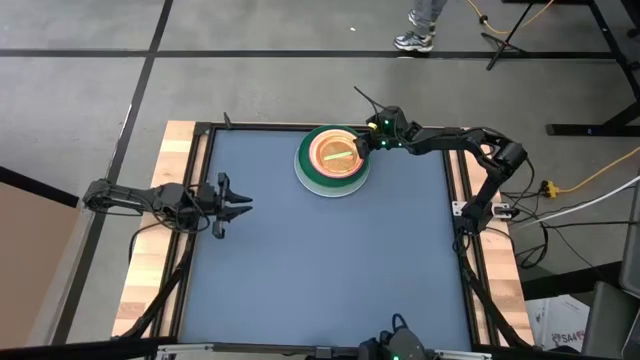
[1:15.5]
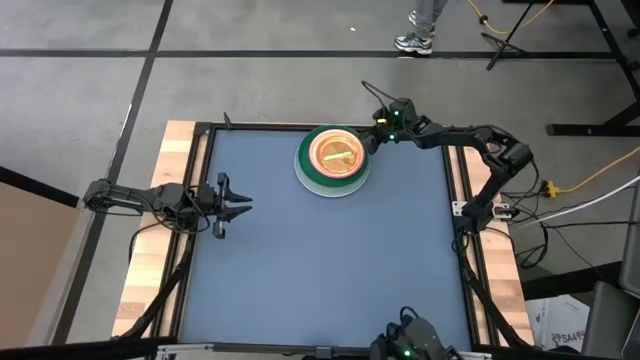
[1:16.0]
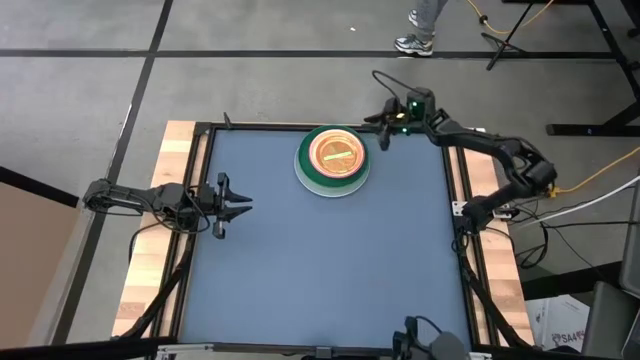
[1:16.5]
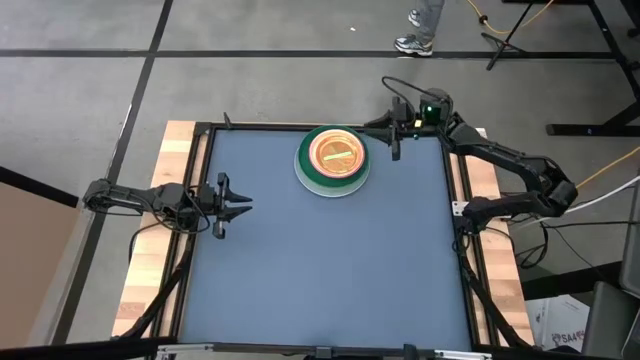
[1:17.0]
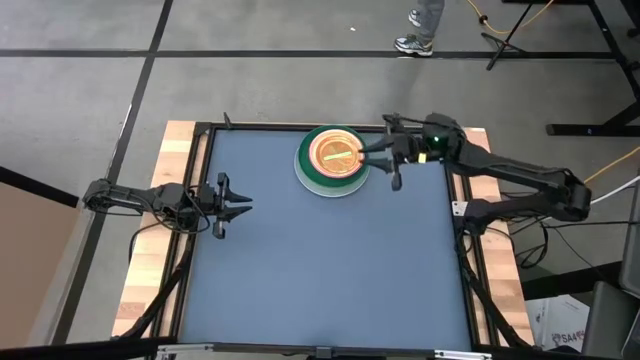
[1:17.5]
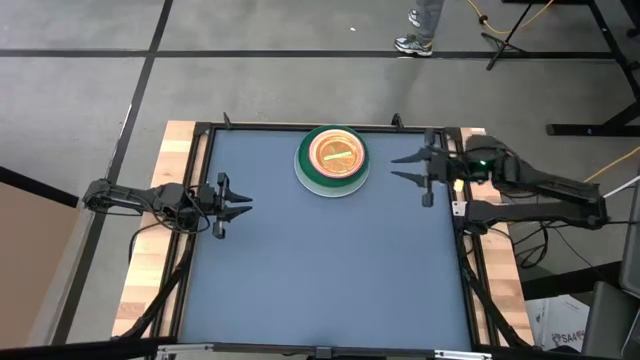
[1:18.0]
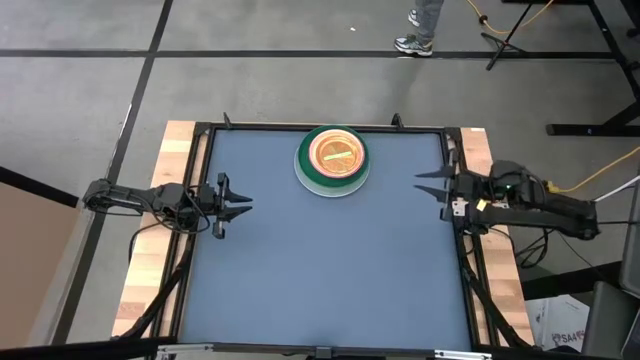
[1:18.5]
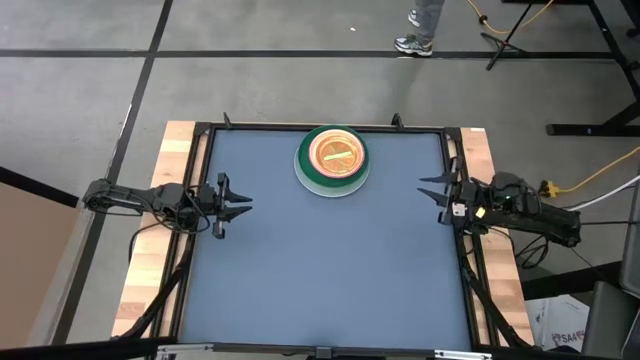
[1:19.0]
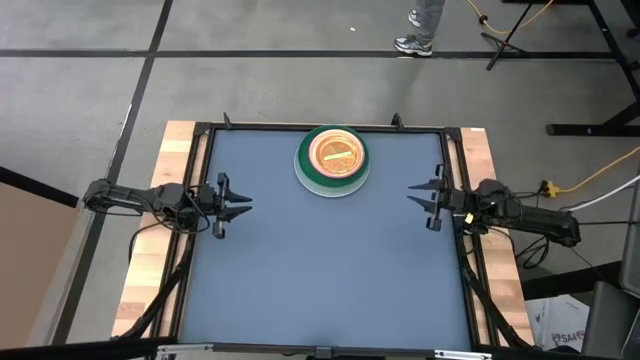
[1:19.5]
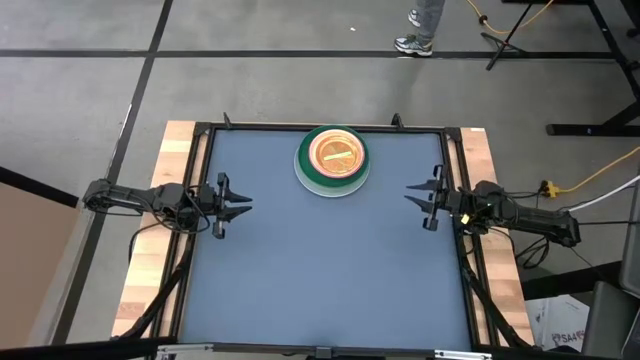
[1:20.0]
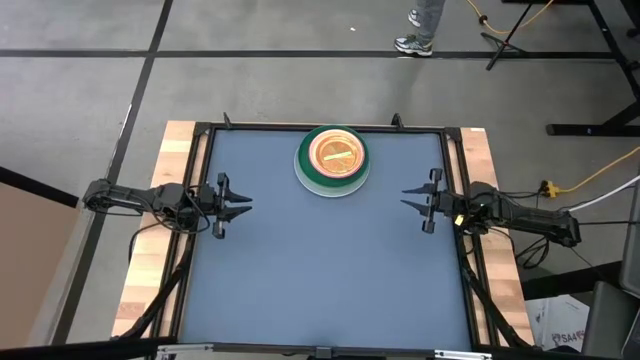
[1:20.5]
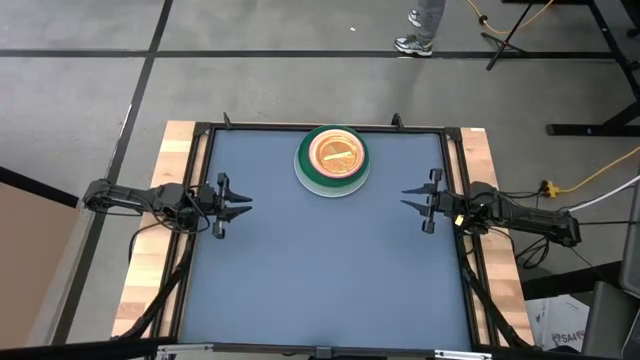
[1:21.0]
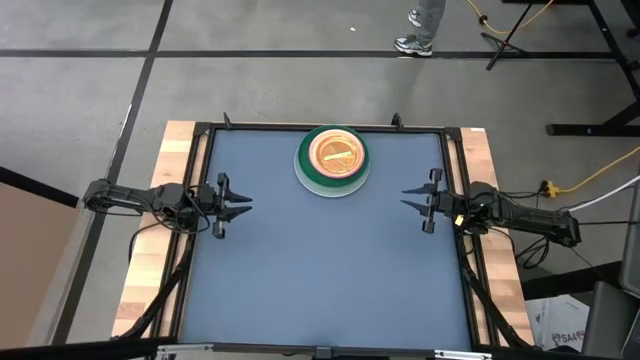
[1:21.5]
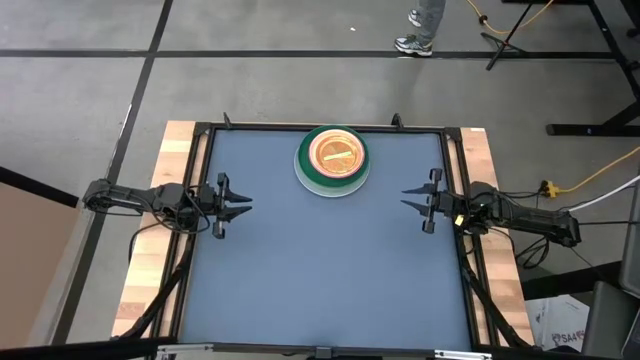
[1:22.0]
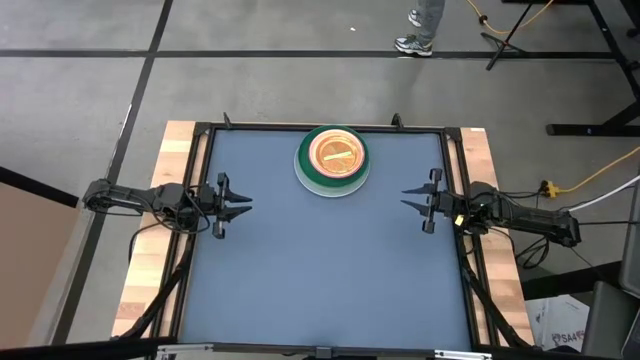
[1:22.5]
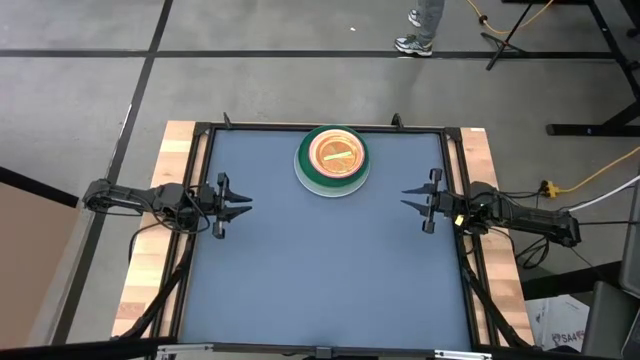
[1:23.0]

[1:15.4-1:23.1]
Task: Stack plastic plates
Return to Home Position

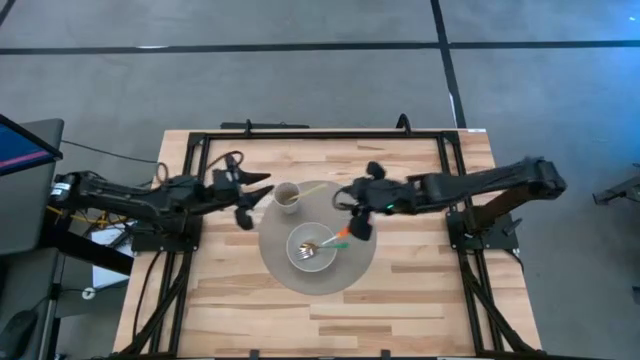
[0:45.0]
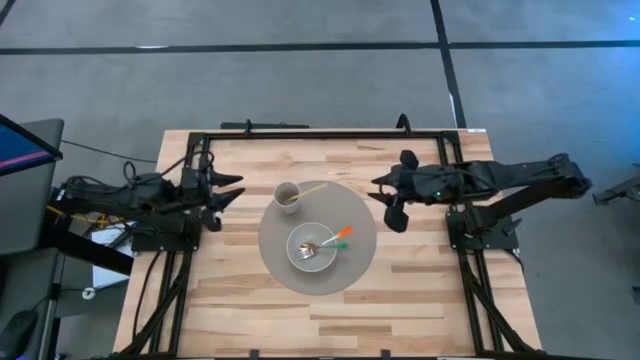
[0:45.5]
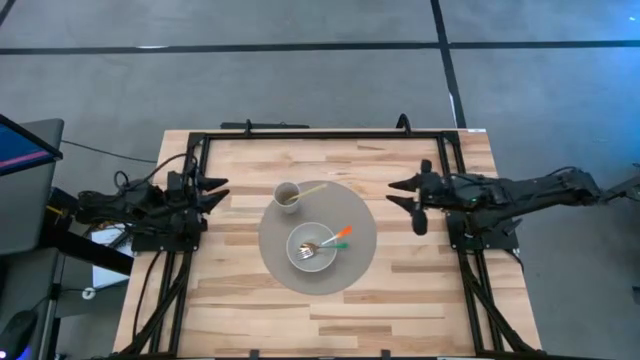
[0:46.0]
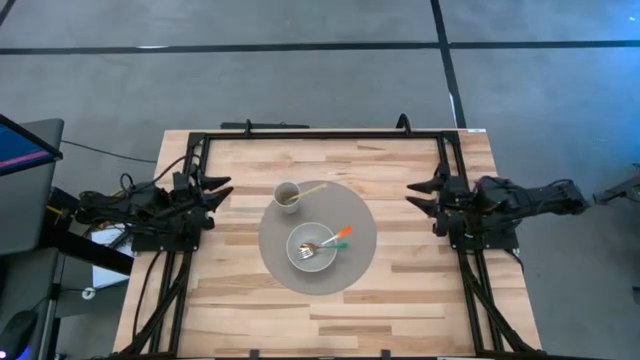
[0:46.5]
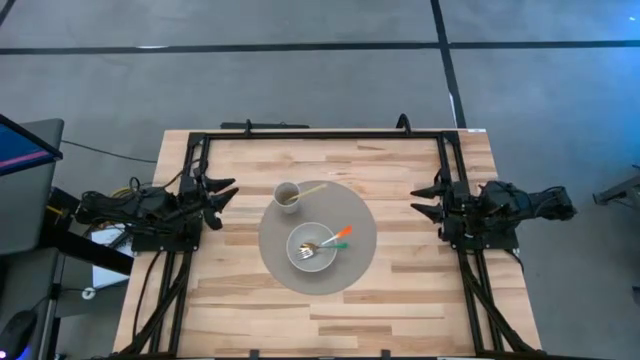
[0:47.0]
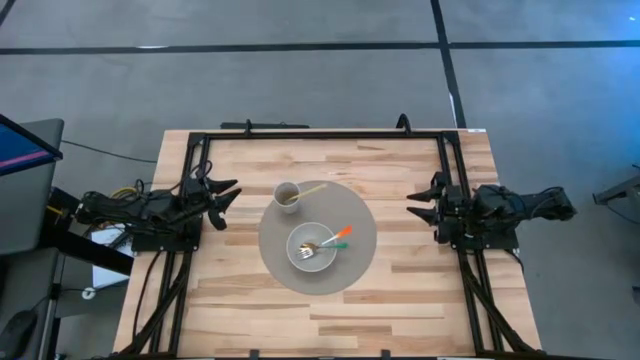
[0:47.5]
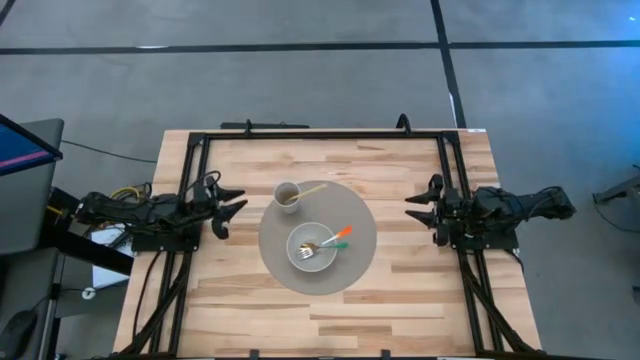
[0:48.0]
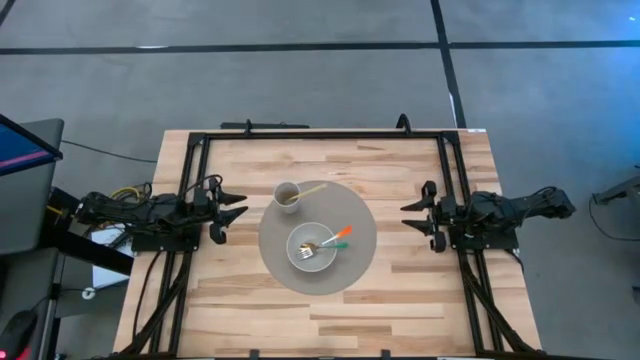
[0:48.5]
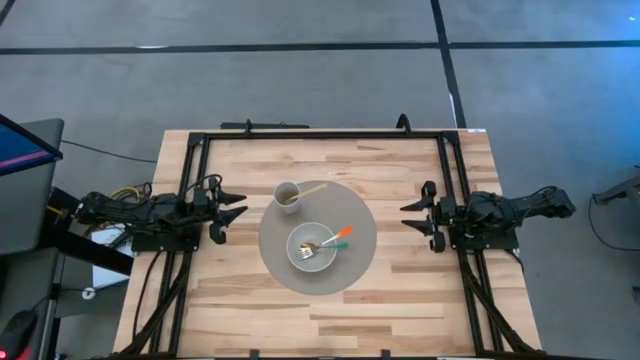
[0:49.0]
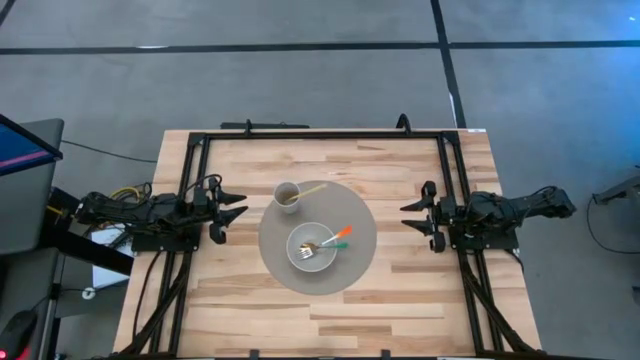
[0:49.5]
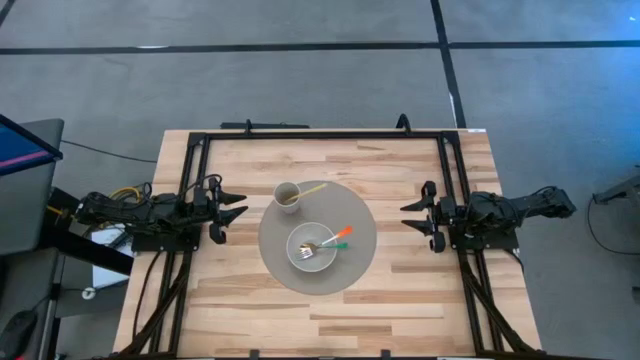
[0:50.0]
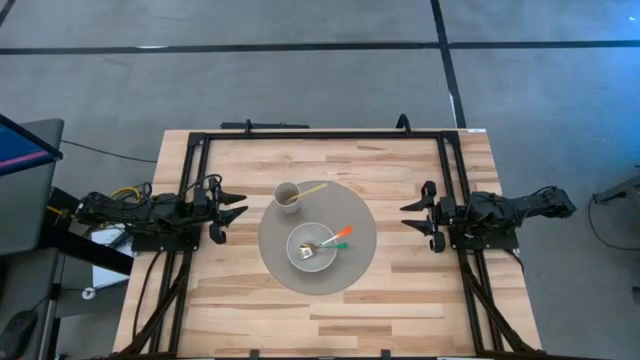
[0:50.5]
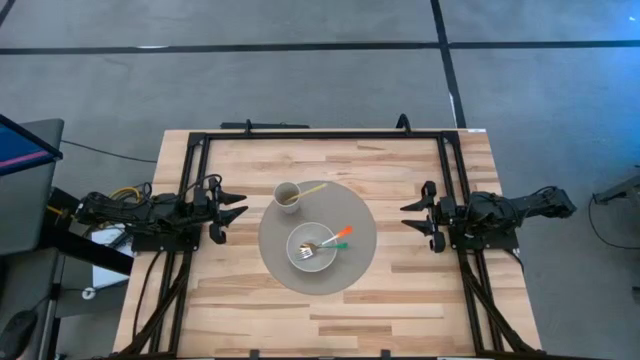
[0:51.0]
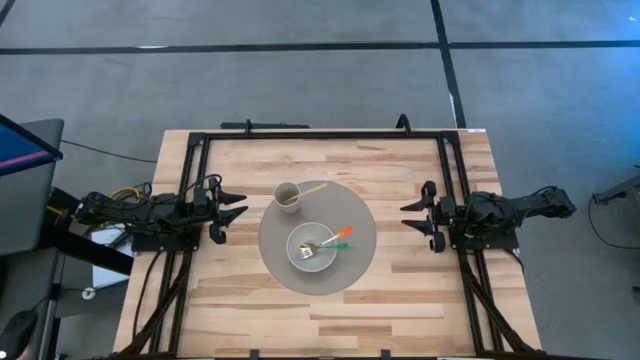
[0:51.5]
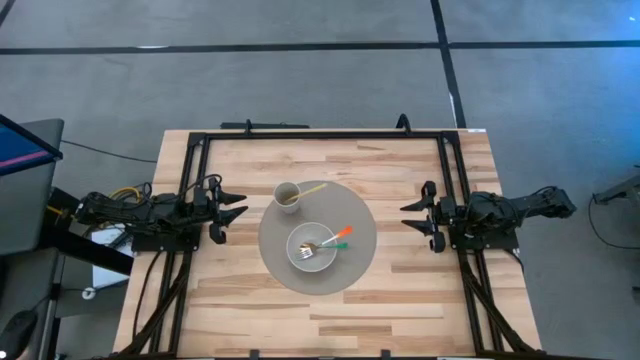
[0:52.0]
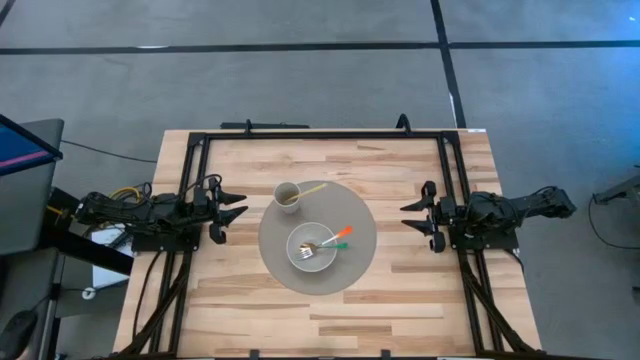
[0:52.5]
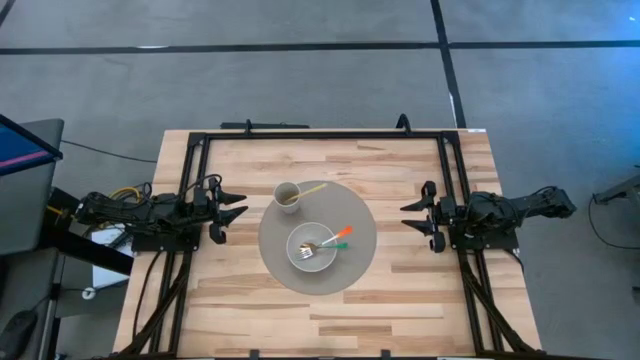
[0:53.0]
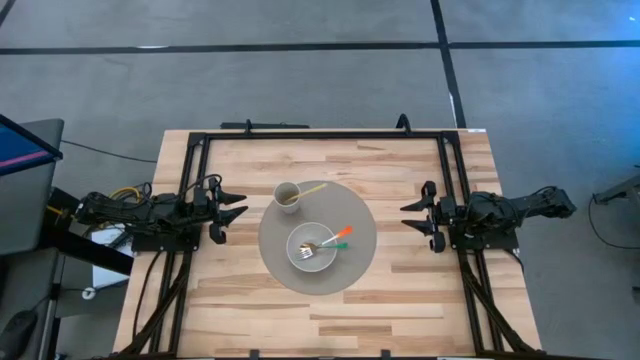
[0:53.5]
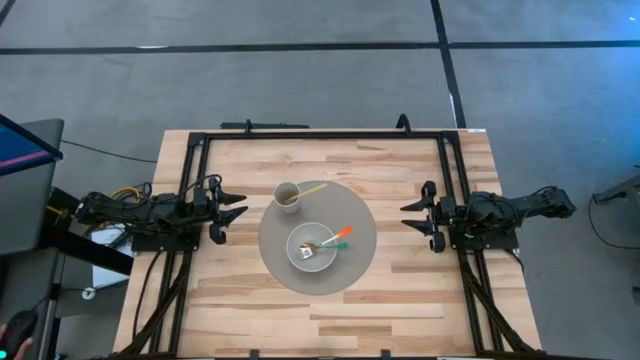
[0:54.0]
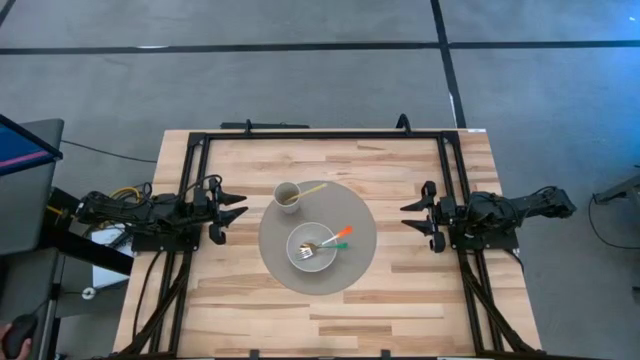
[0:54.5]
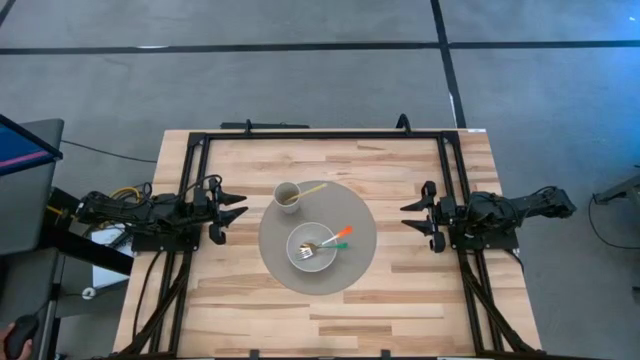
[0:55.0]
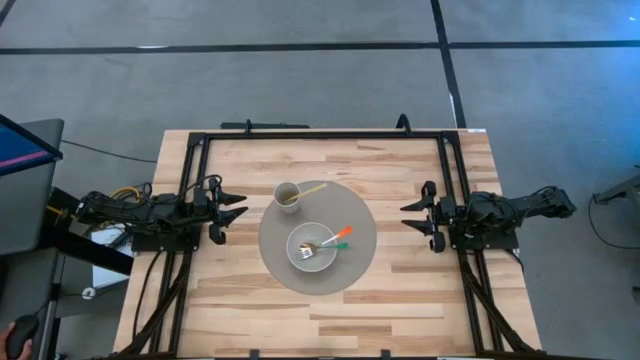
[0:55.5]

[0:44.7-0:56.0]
Task: Pick & Place Utensil
Return to Home Position

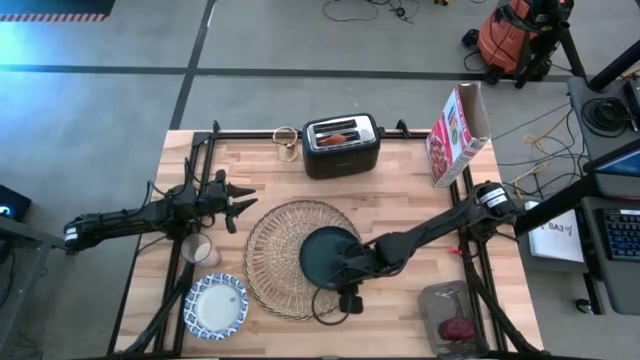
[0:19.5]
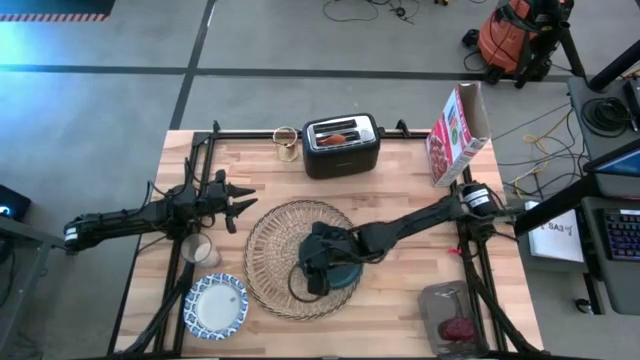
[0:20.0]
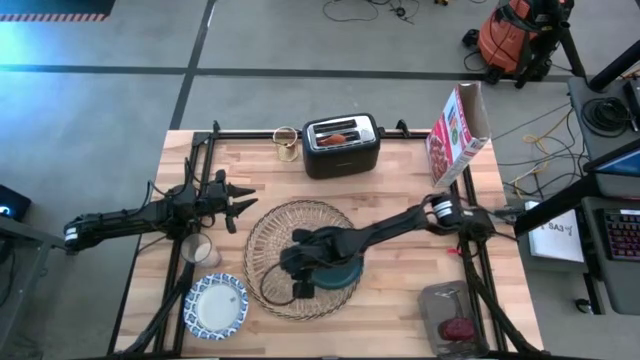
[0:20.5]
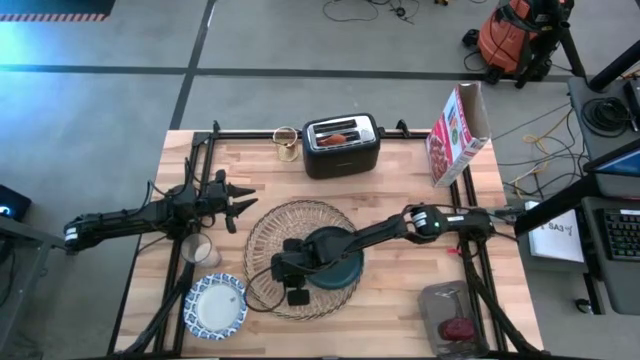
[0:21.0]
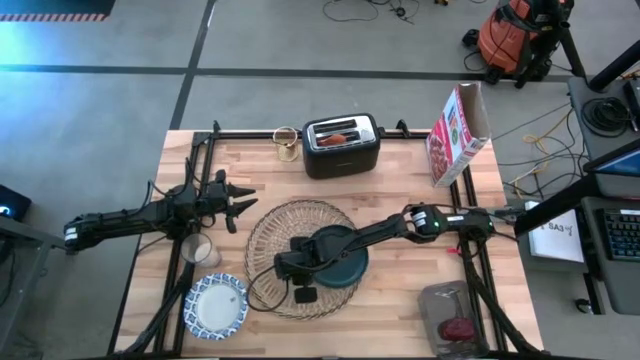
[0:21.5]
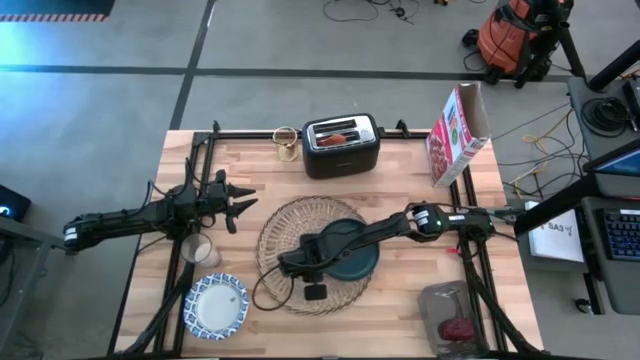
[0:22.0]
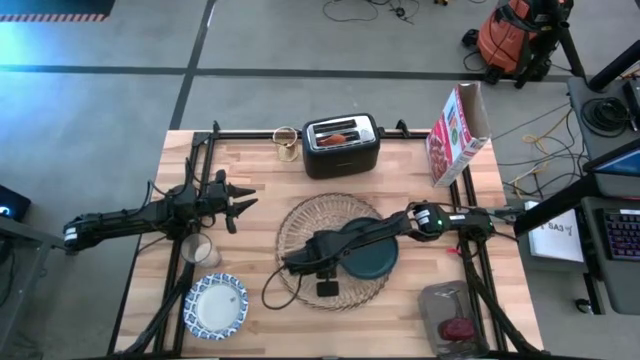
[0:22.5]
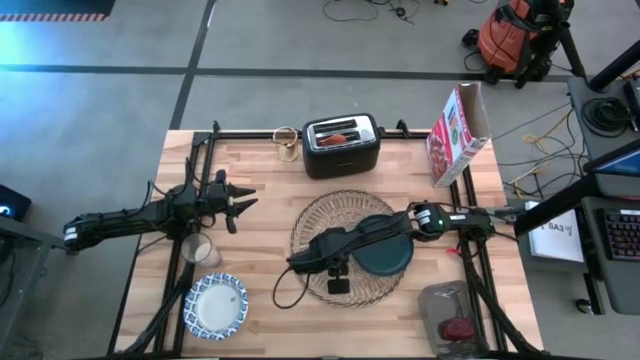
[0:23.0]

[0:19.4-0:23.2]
Task: Arrange a breakfast setting
Adjust the brown place mat
